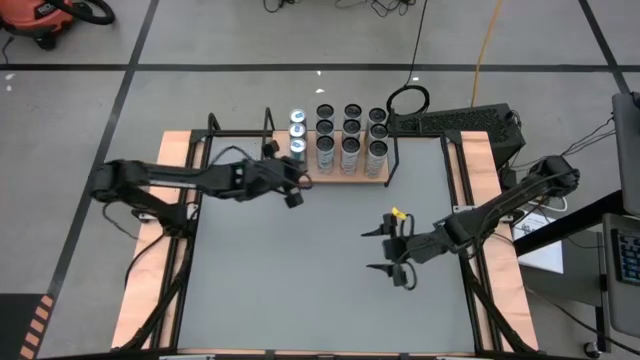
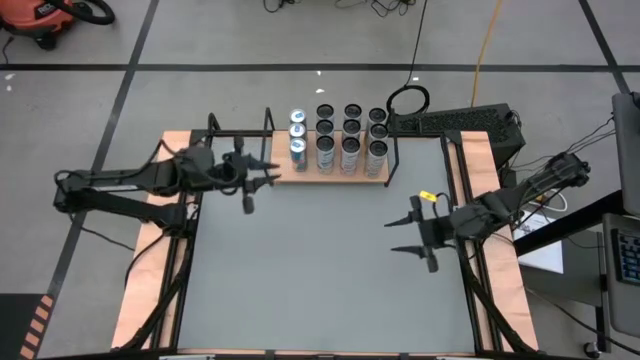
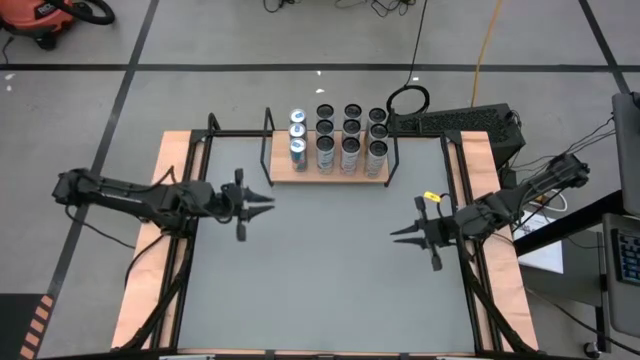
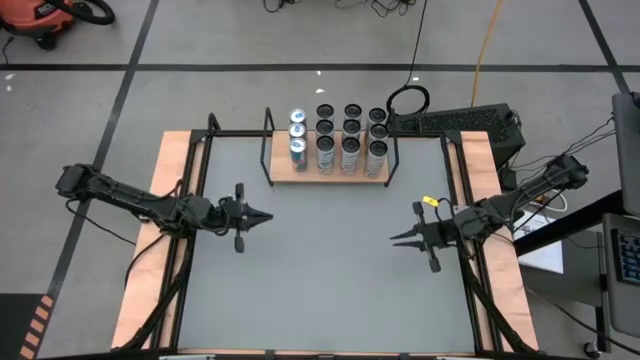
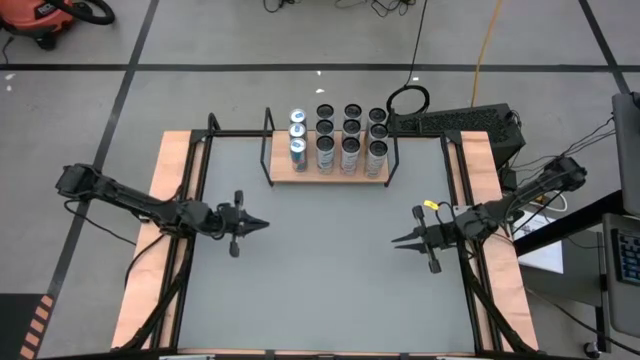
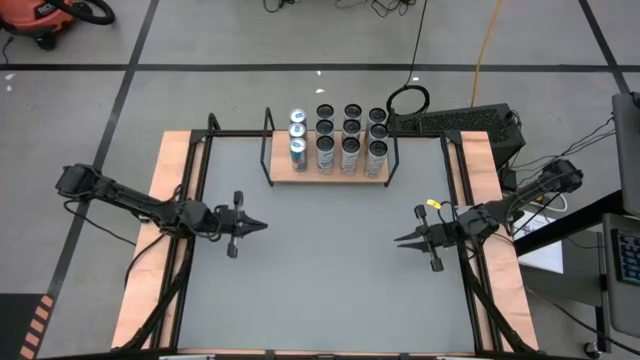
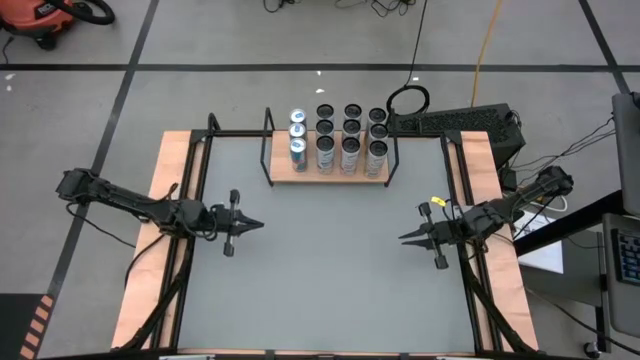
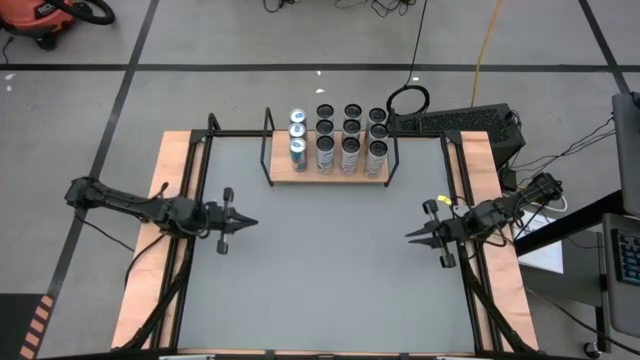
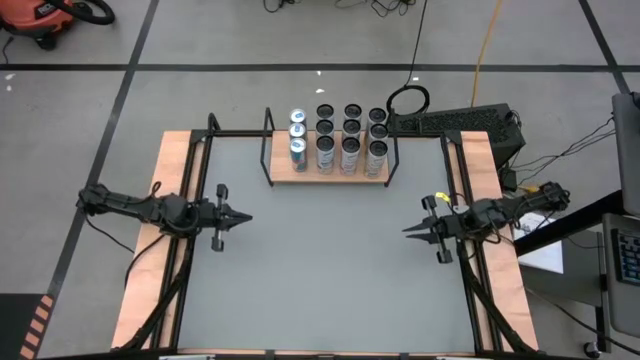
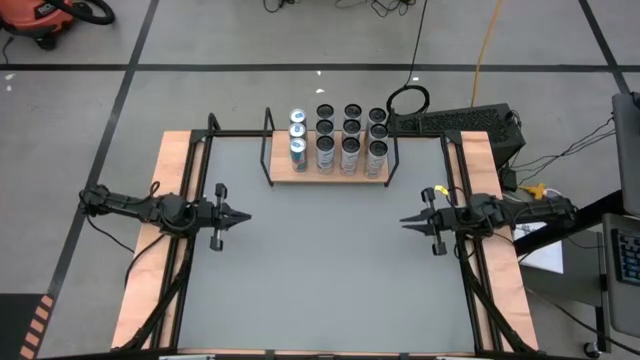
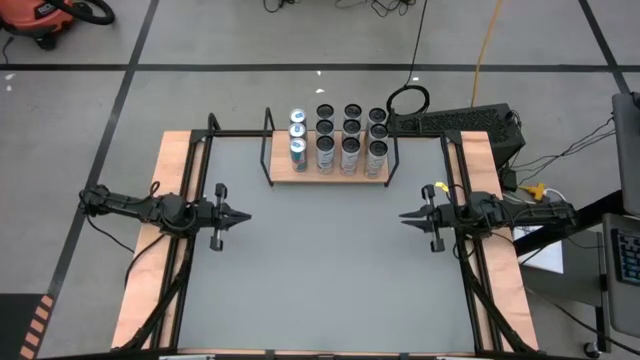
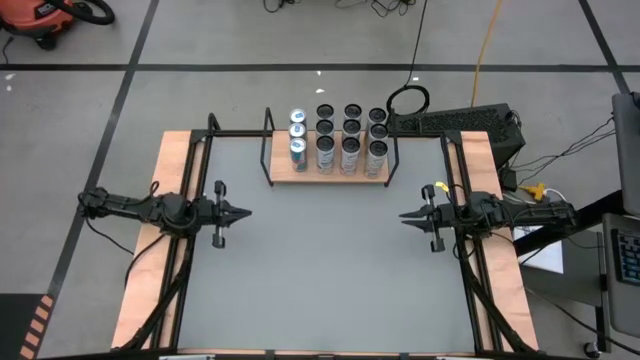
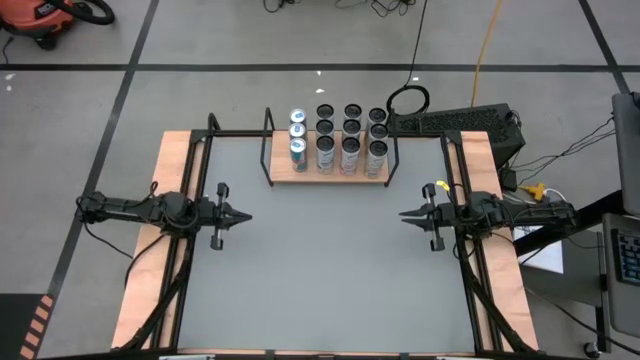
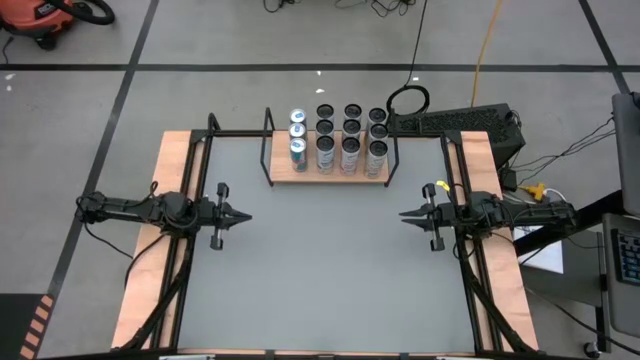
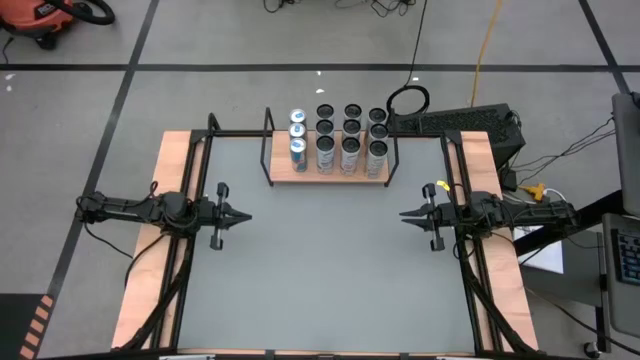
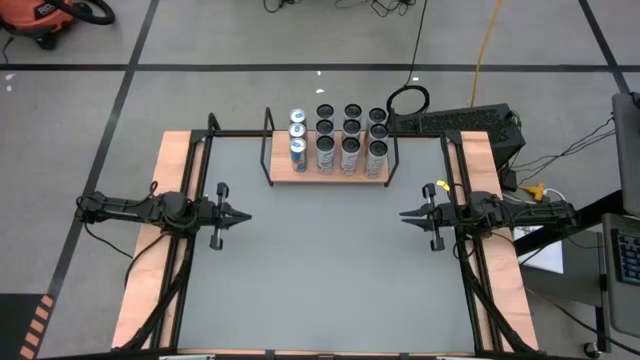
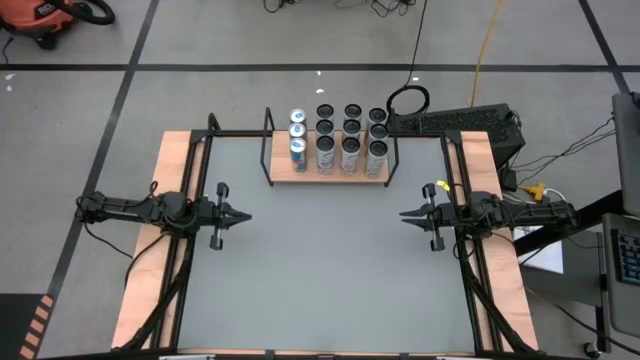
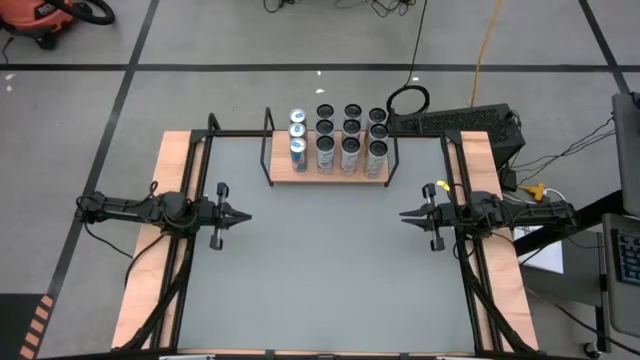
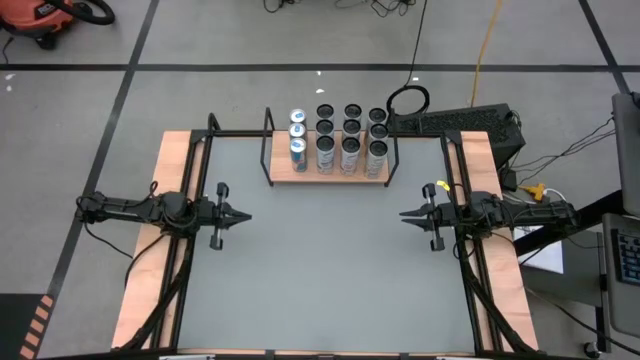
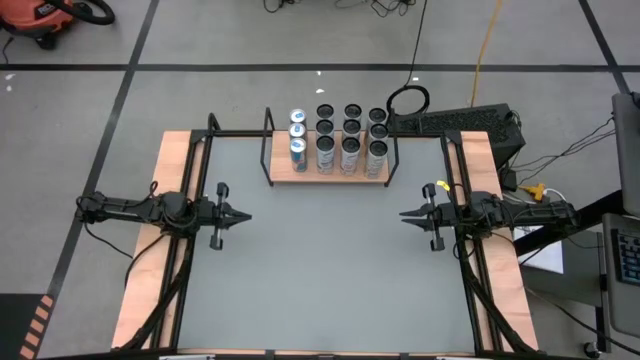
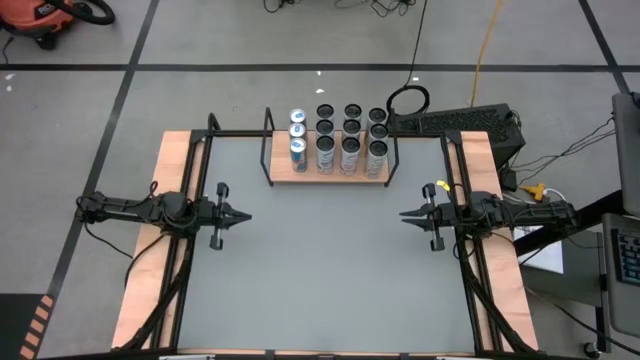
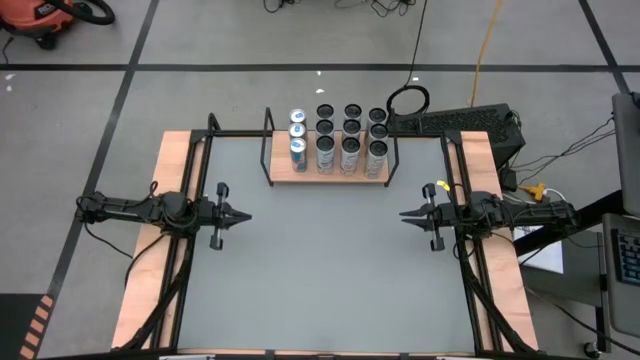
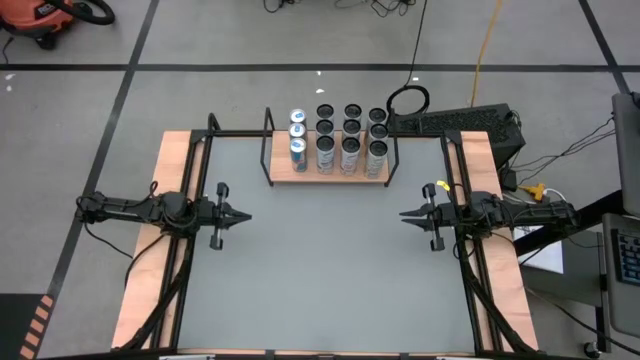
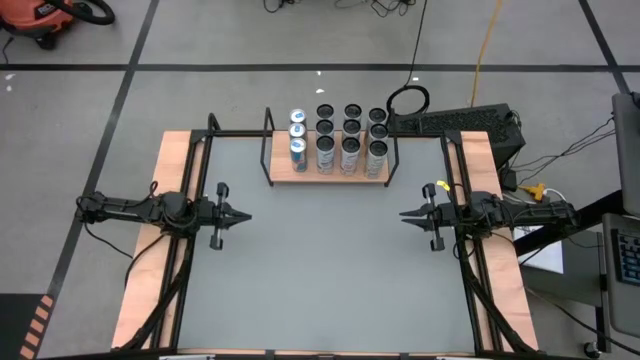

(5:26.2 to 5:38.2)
Task: Place canned beverage on shelf
Return to Home Position

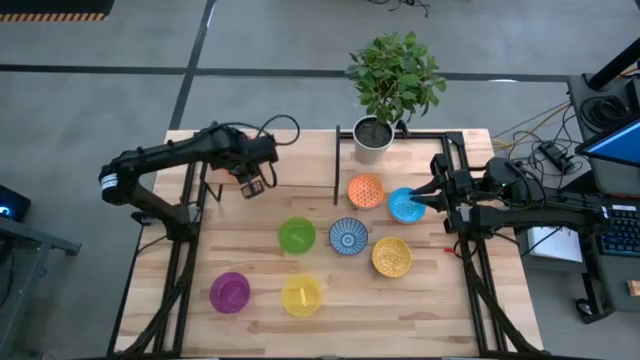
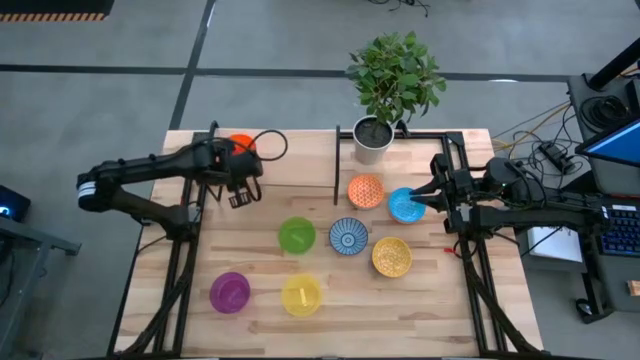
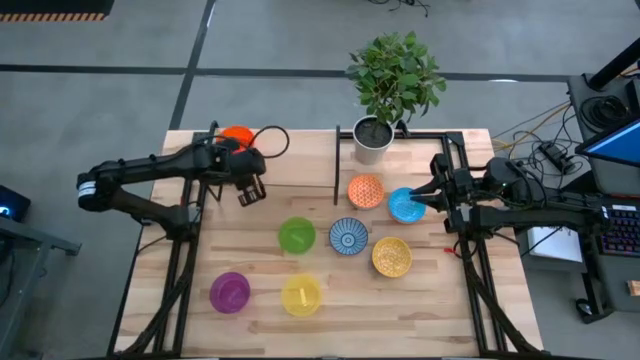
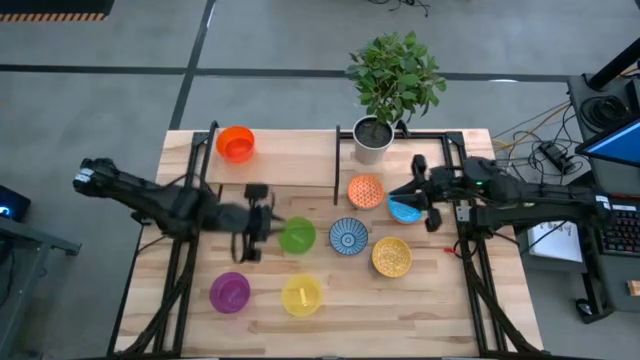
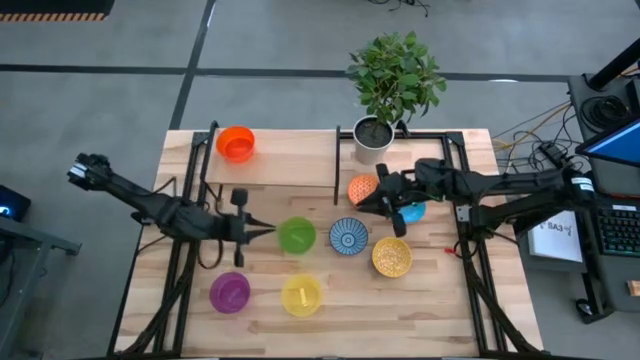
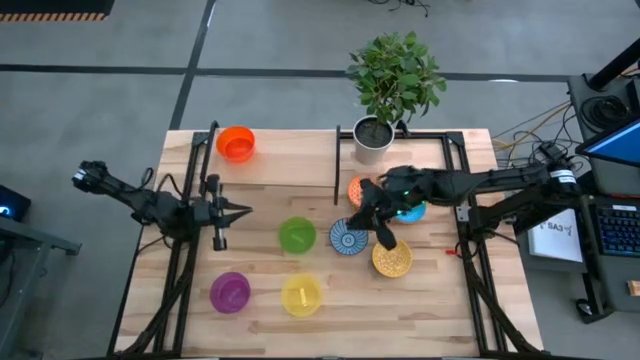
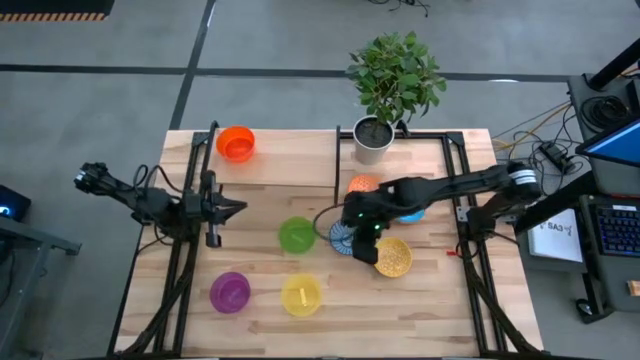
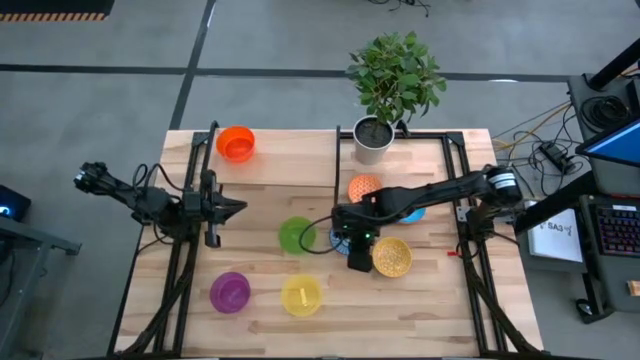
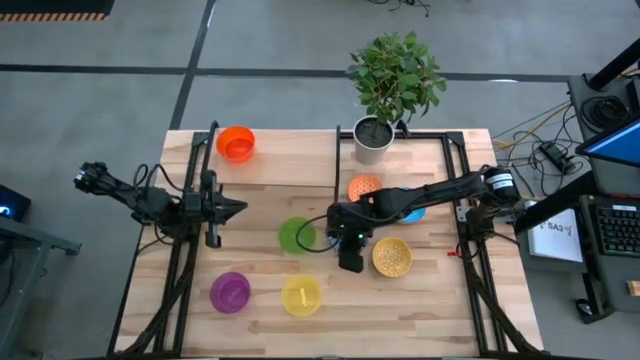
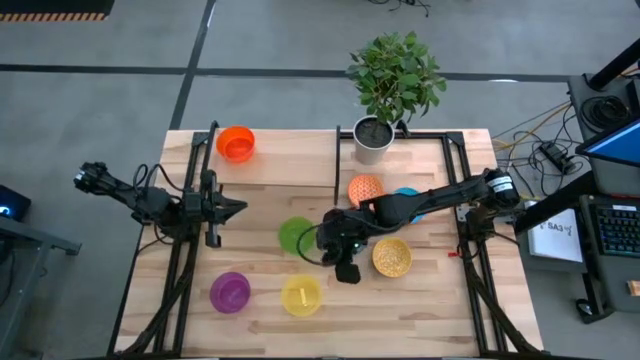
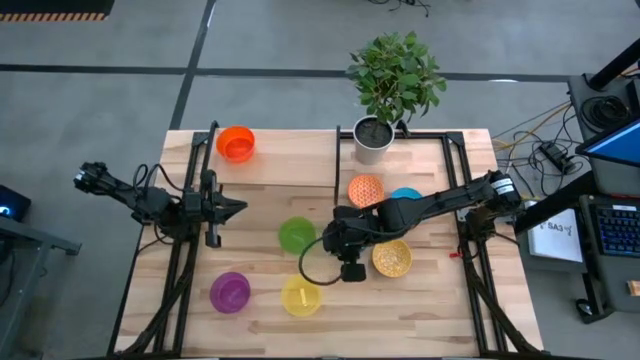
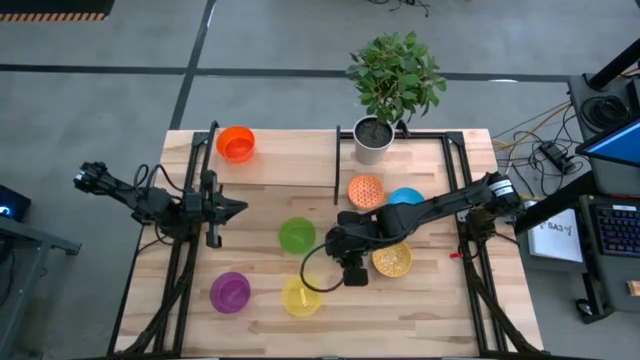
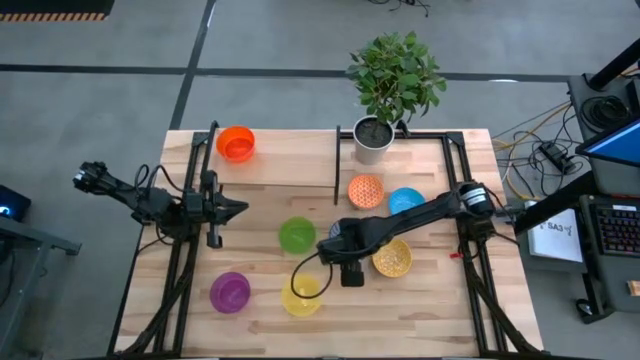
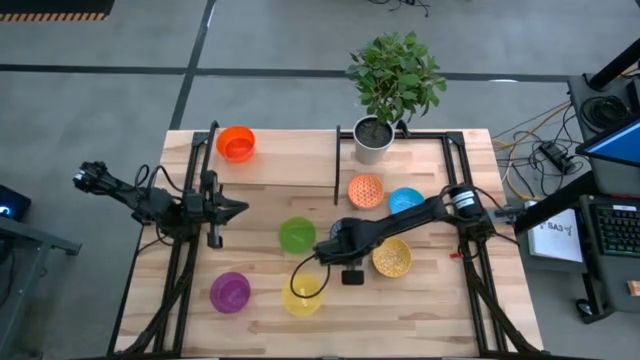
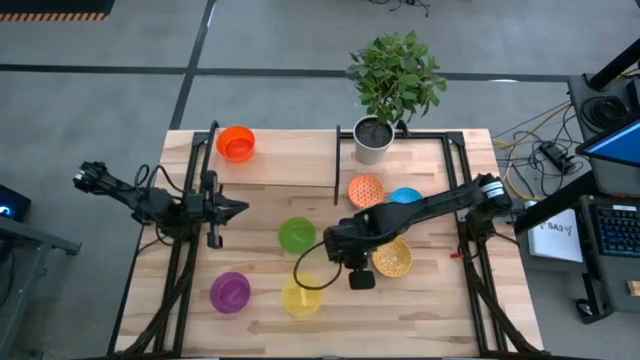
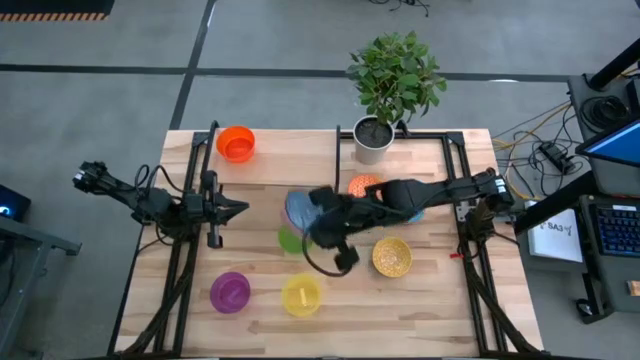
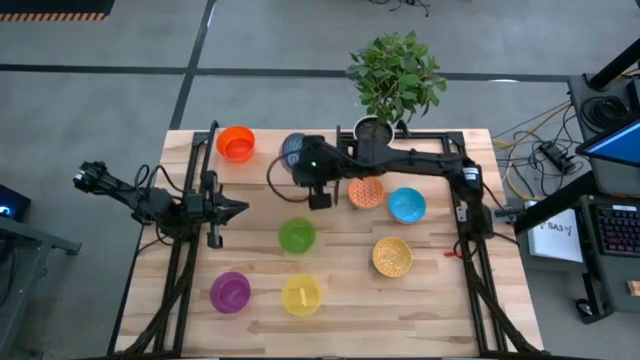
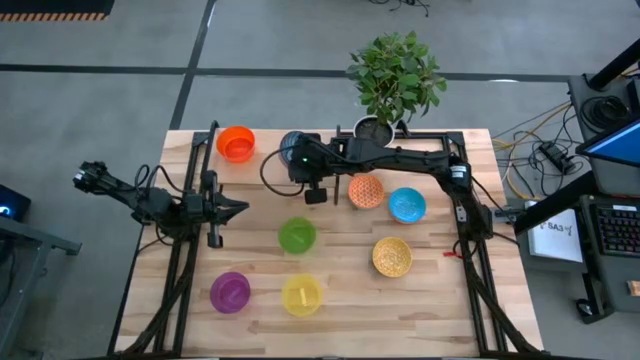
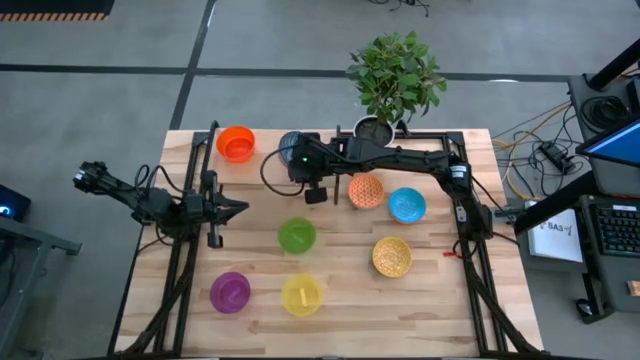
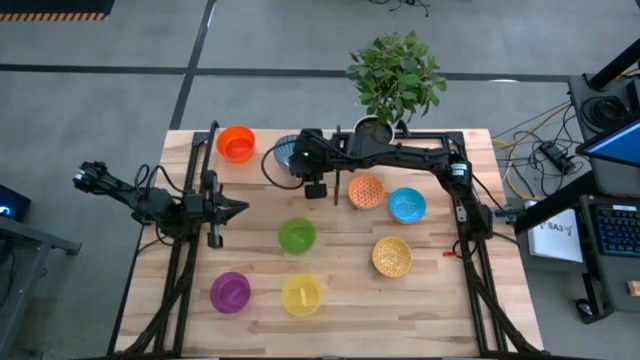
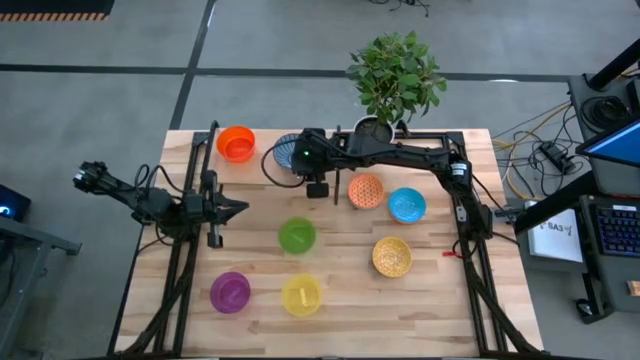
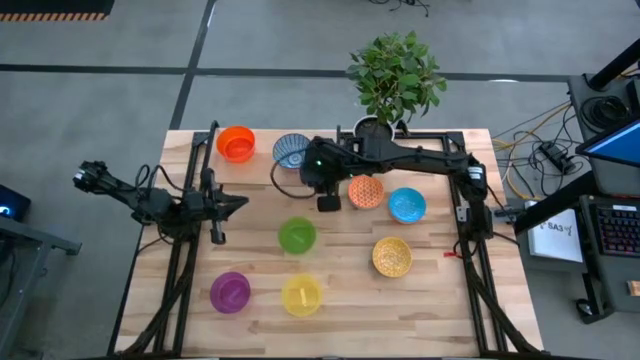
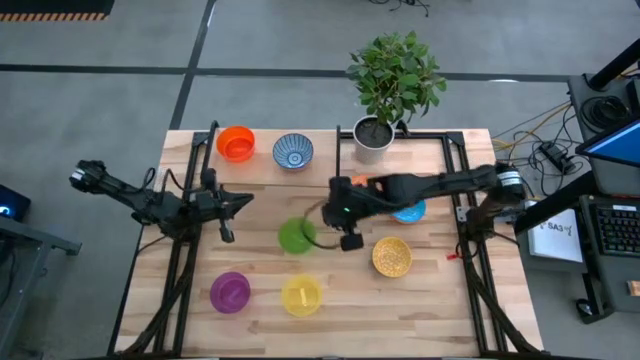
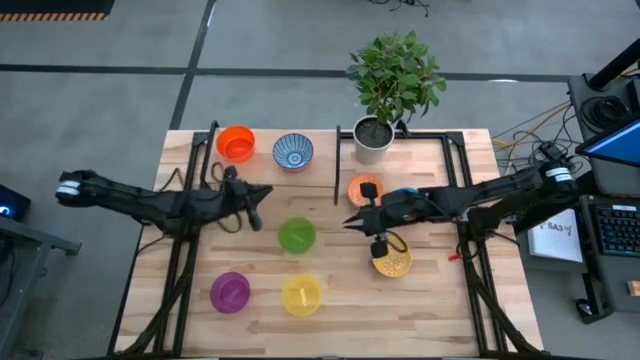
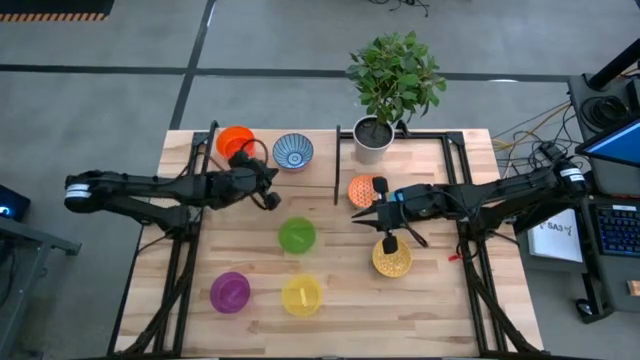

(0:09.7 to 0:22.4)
Task: Place and stack bowls onto a shelf
Put the red bowl on the shelf
